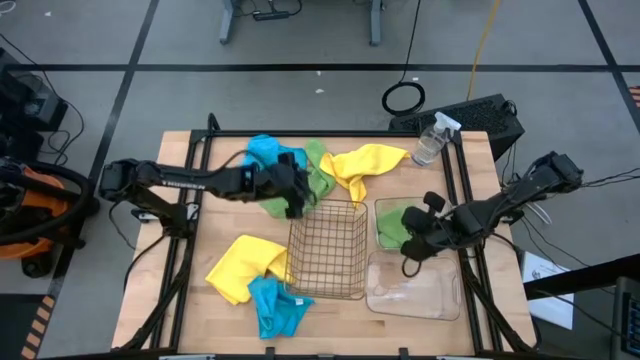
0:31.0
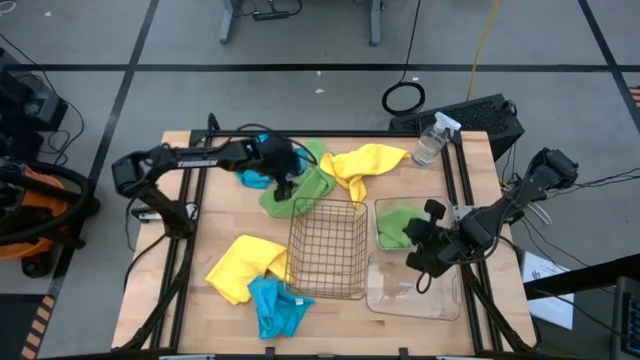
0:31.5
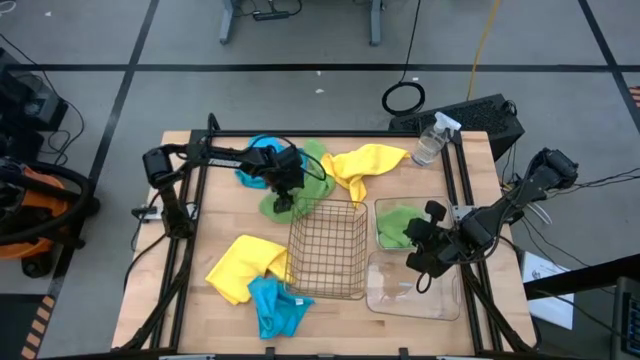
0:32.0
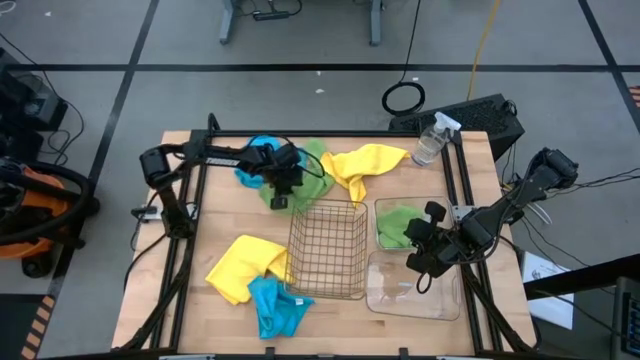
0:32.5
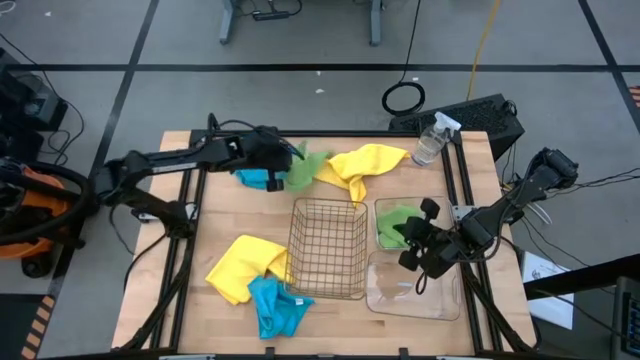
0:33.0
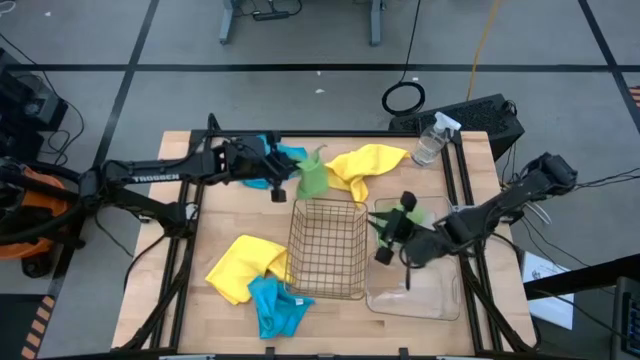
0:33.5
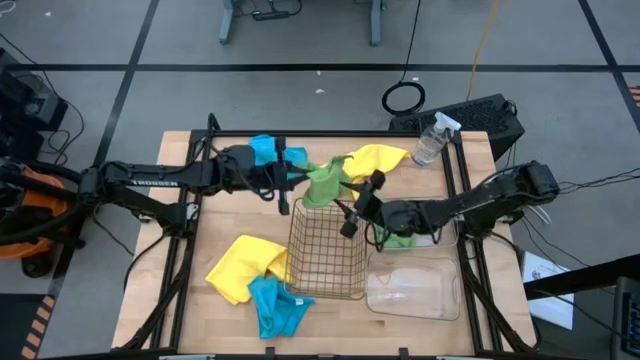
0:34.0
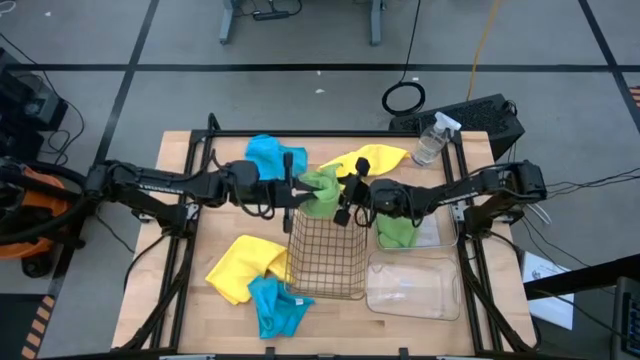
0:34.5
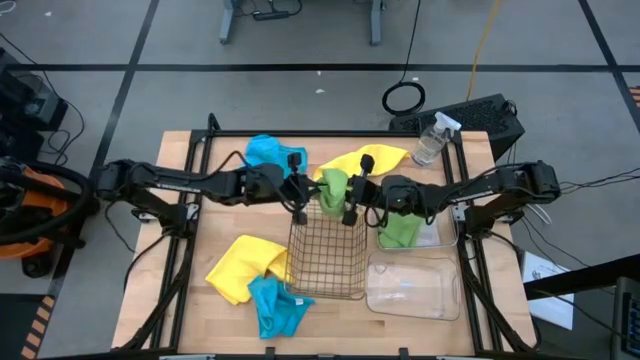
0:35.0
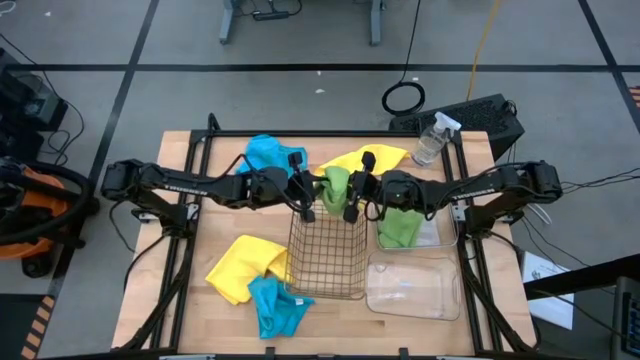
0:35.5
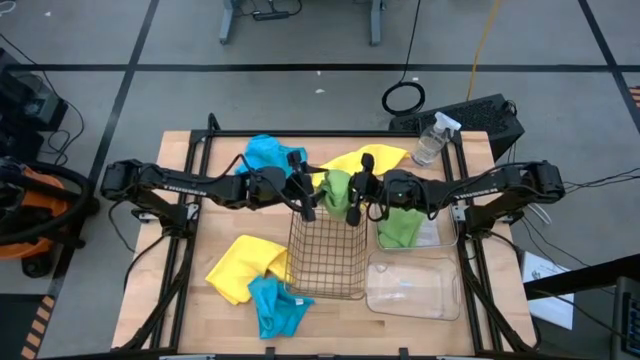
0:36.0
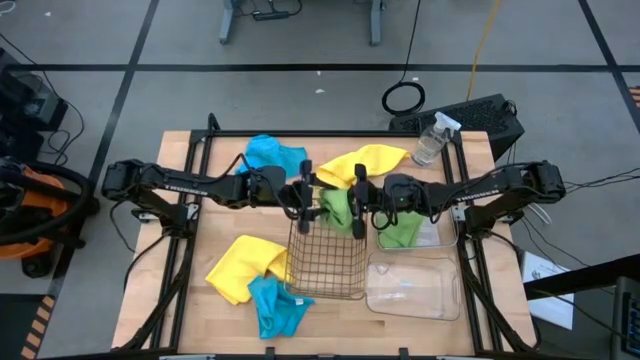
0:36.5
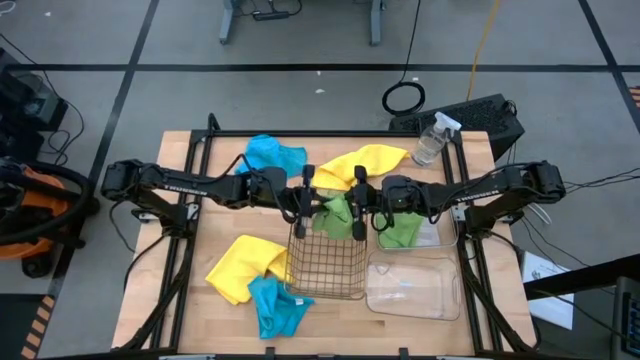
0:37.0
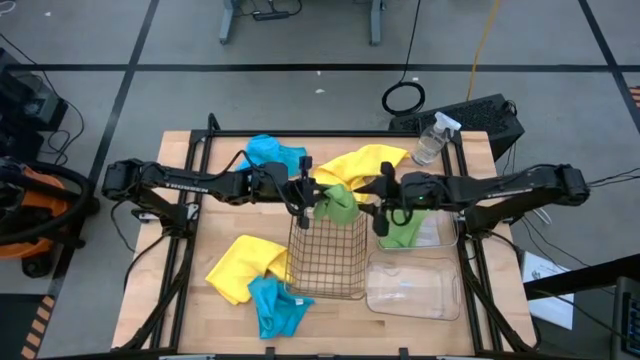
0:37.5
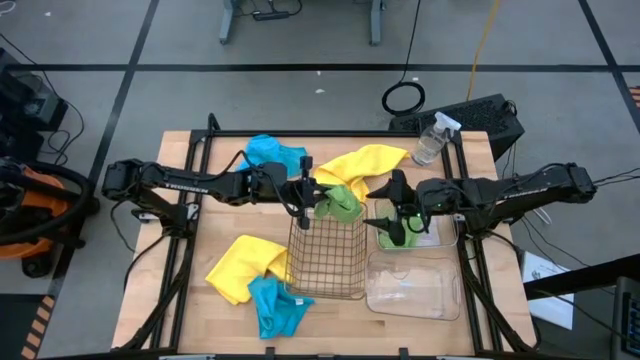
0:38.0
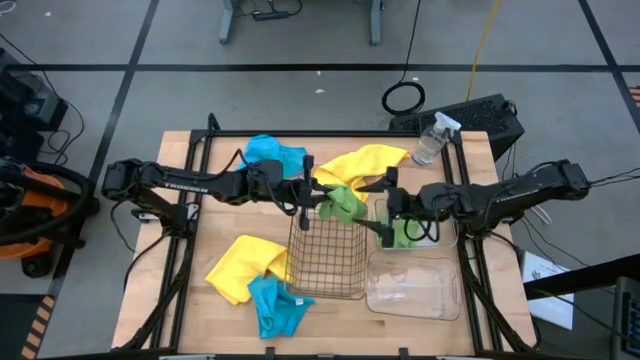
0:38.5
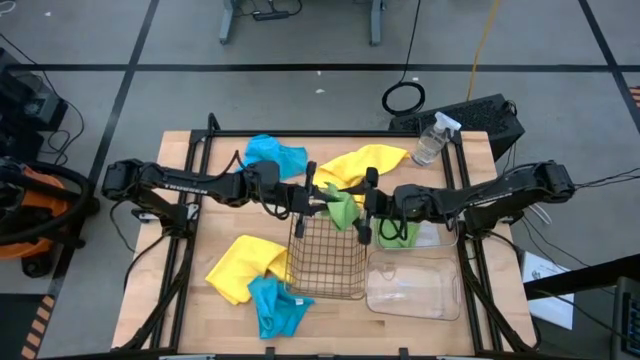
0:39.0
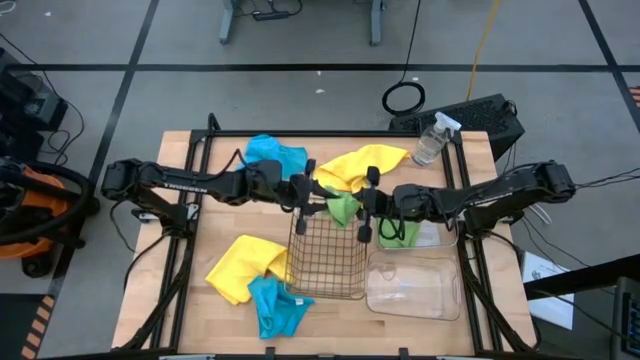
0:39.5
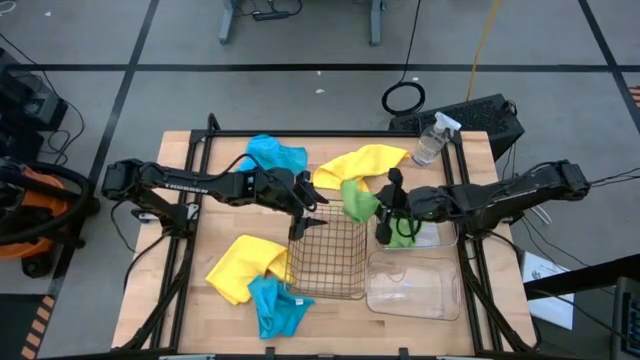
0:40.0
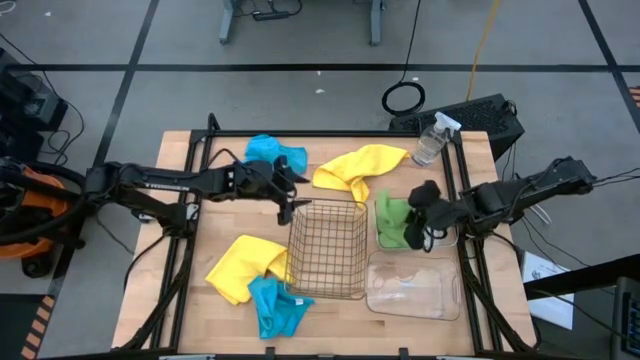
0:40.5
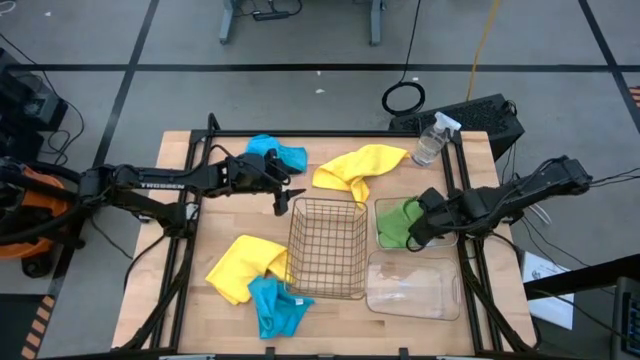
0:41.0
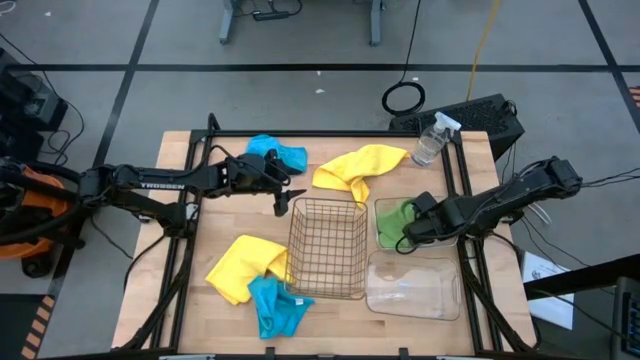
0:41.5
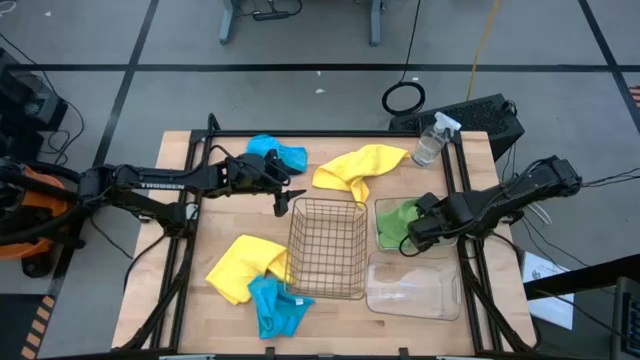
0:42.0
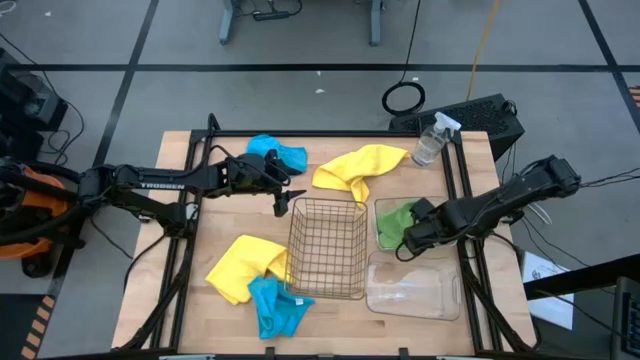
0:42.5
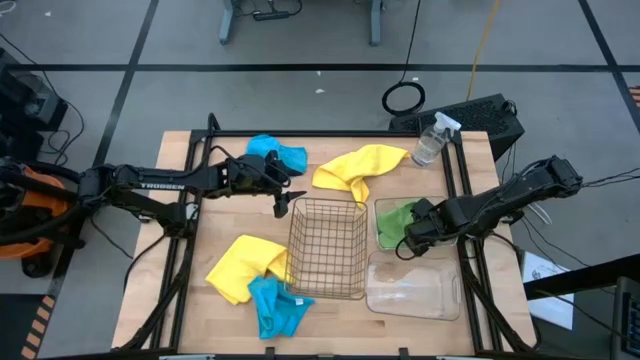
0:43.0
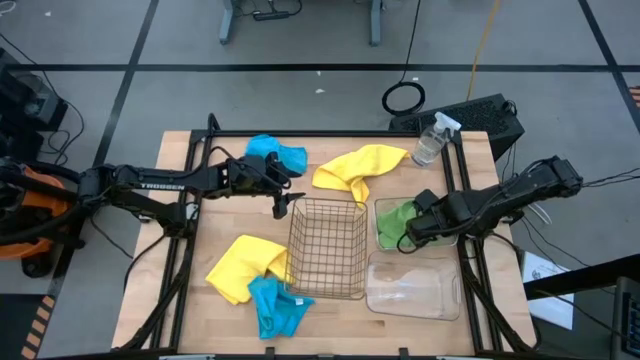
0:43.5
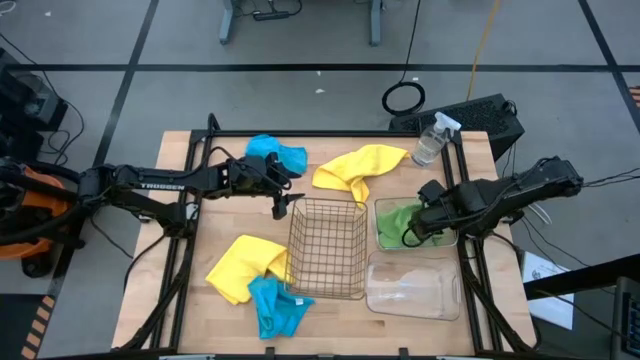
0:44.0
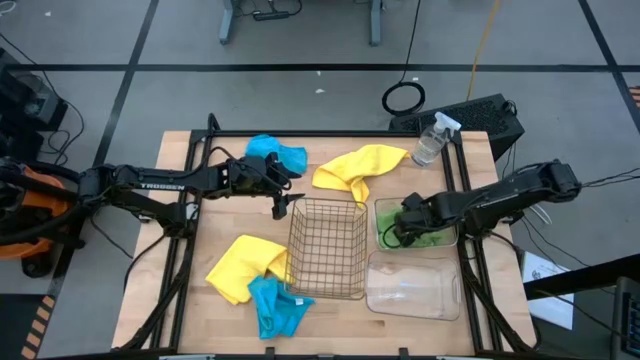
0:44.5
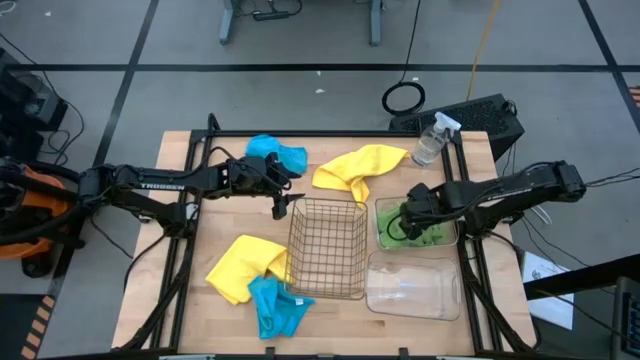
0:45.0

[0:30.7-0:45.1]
Task: Sort microfiber towel by color & place in baskets
Put the green microfiber cloth into the top transparent bin

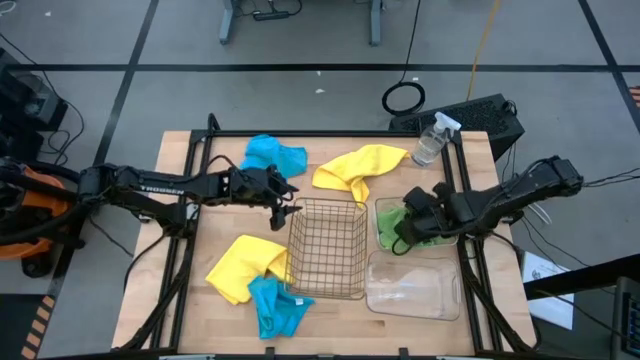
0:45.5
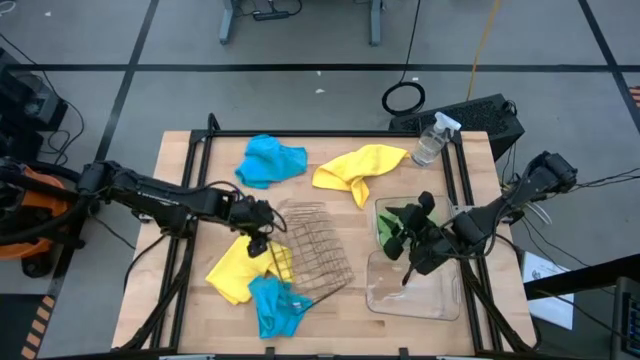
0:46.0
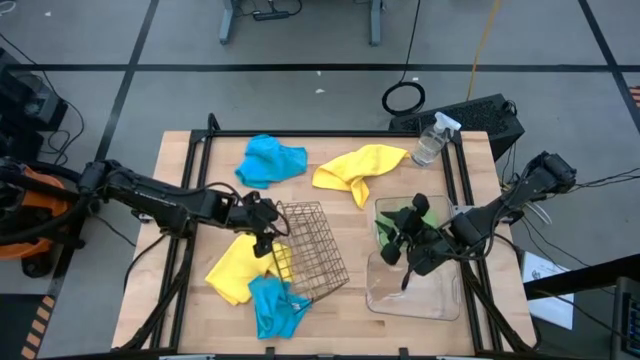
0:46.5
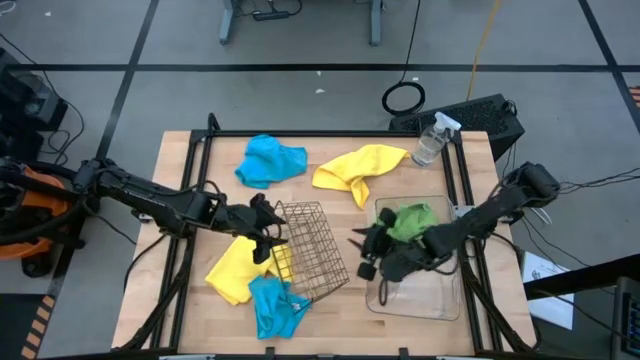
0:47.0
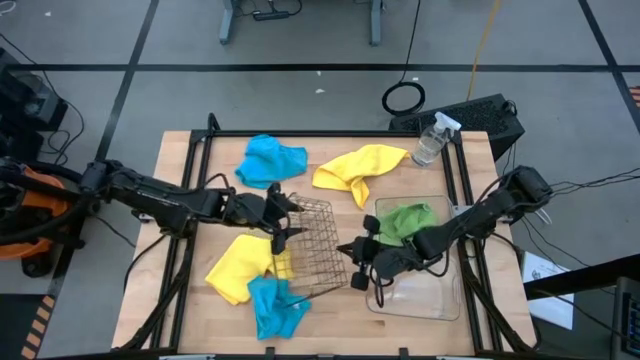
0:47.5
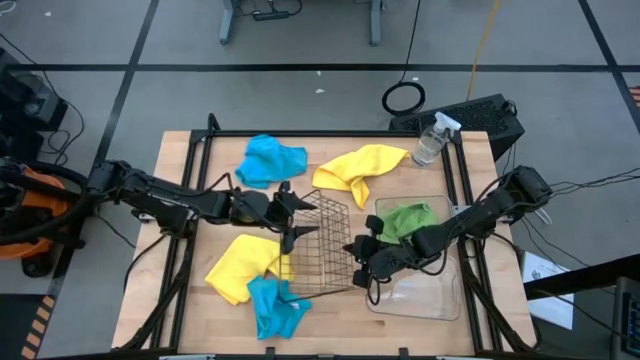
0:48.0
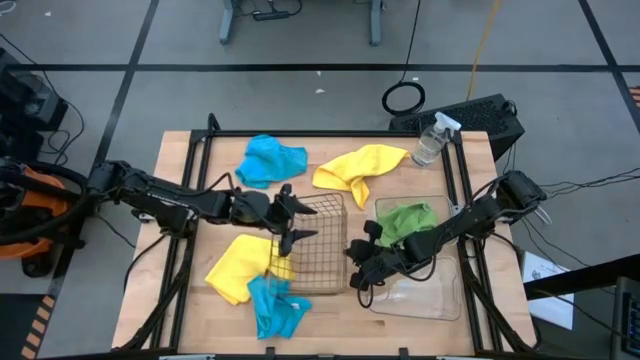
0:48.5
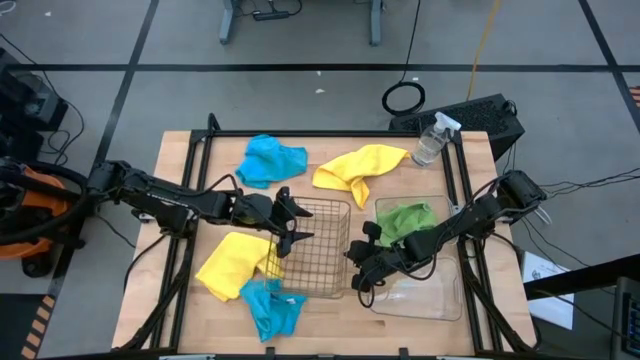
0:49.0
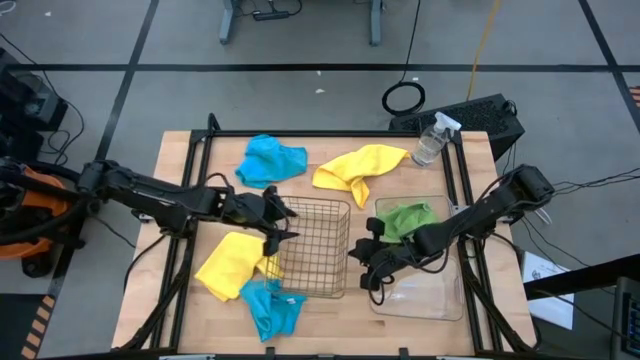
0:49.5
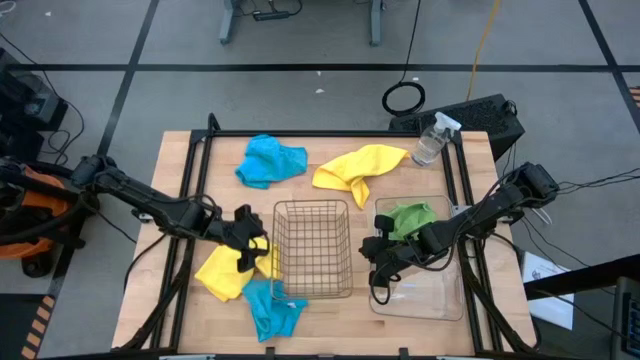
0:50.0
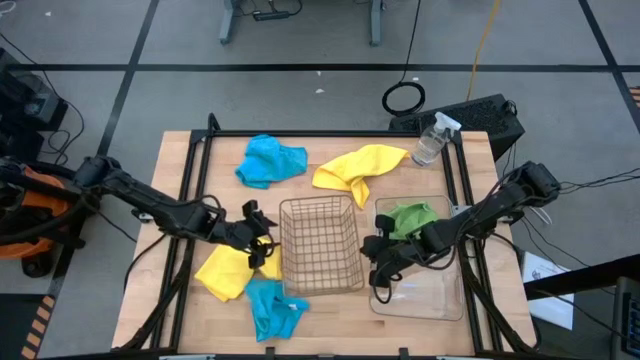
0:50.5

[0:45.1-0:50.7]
Adjust the wire basket
